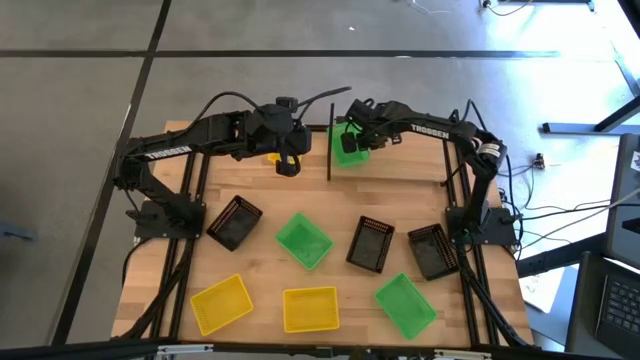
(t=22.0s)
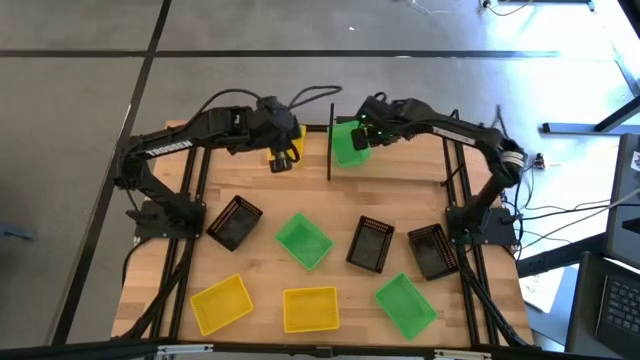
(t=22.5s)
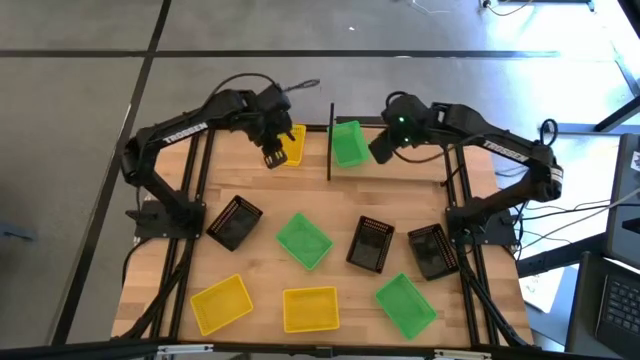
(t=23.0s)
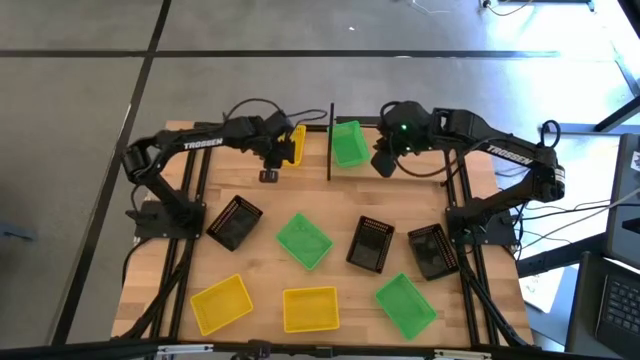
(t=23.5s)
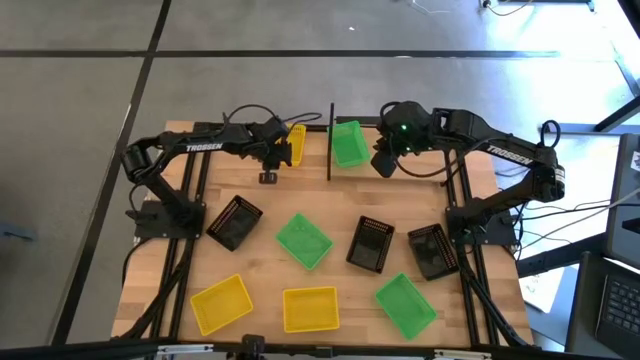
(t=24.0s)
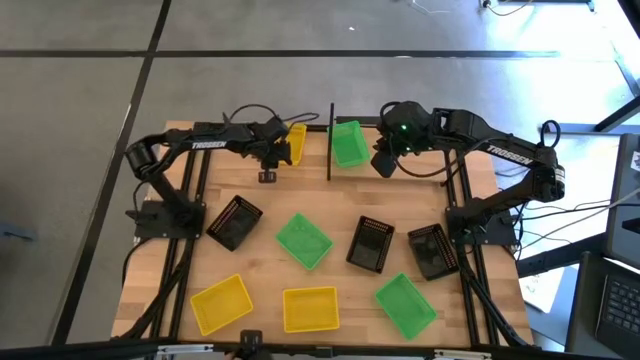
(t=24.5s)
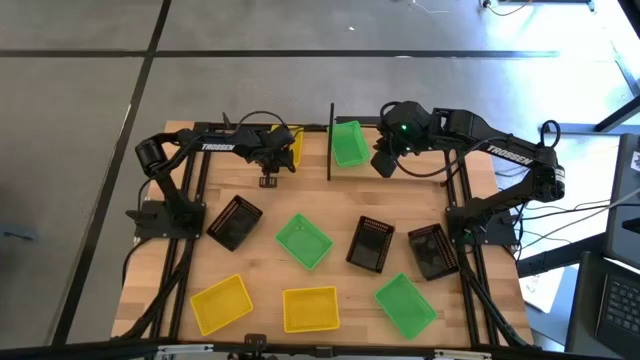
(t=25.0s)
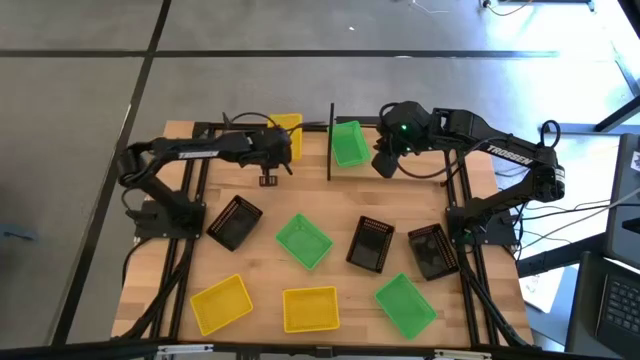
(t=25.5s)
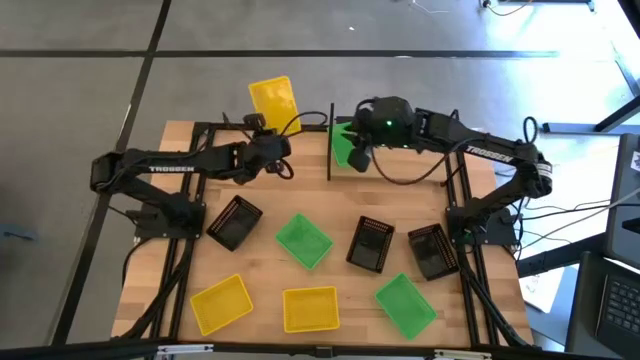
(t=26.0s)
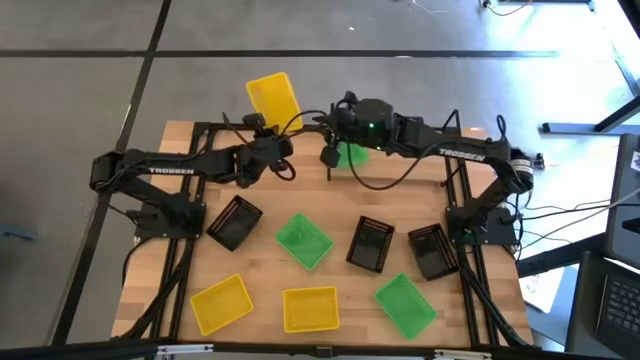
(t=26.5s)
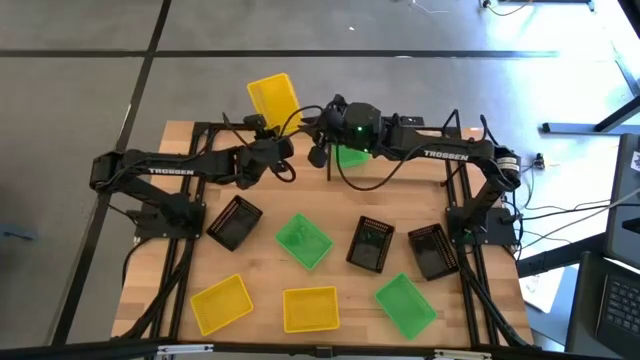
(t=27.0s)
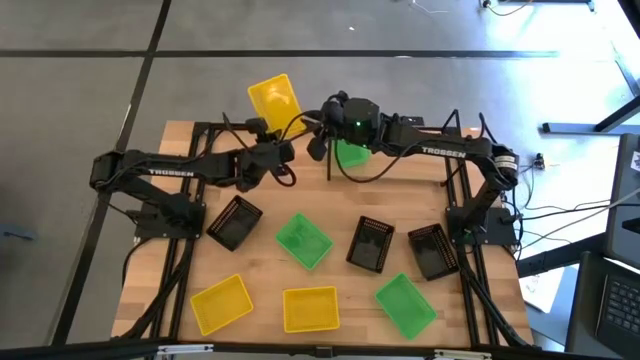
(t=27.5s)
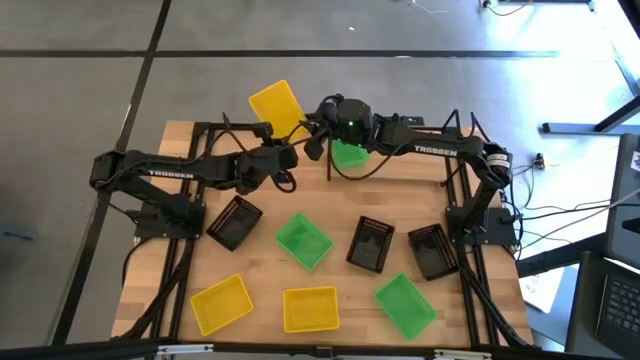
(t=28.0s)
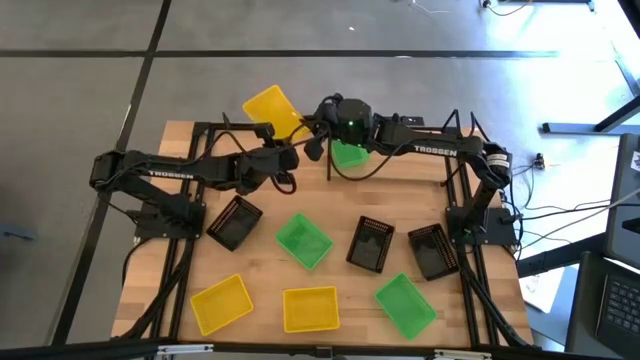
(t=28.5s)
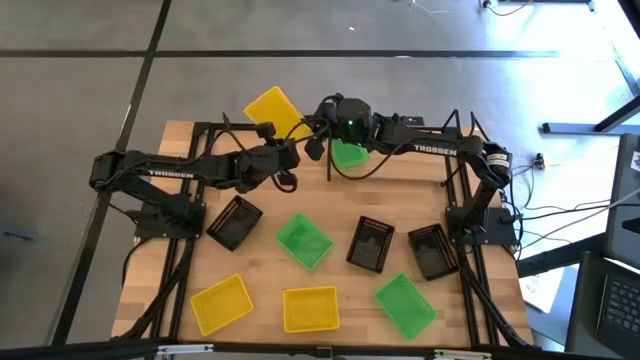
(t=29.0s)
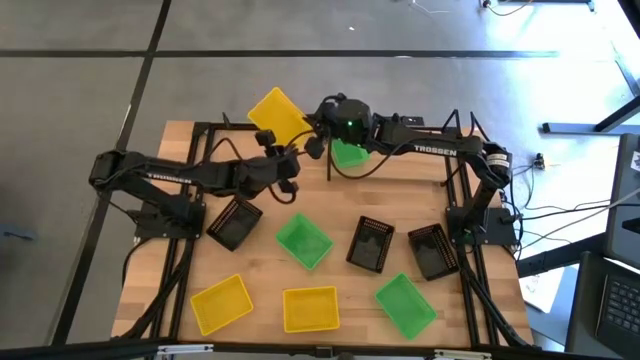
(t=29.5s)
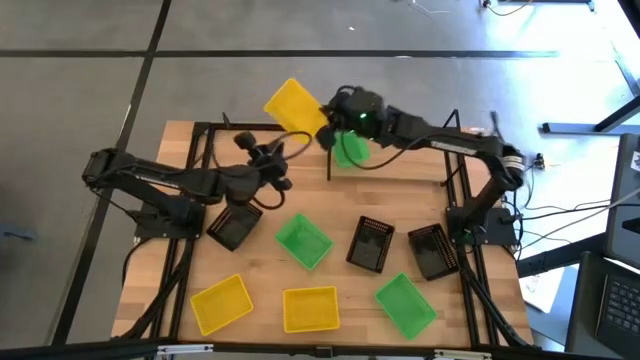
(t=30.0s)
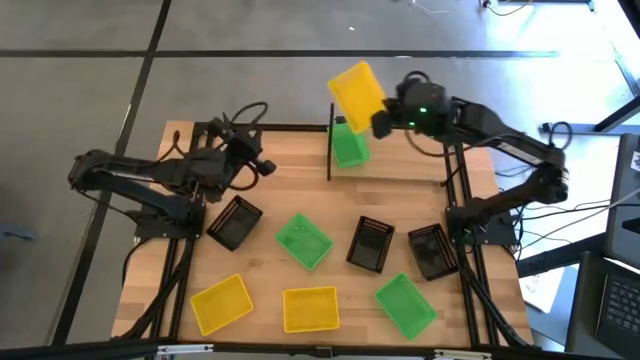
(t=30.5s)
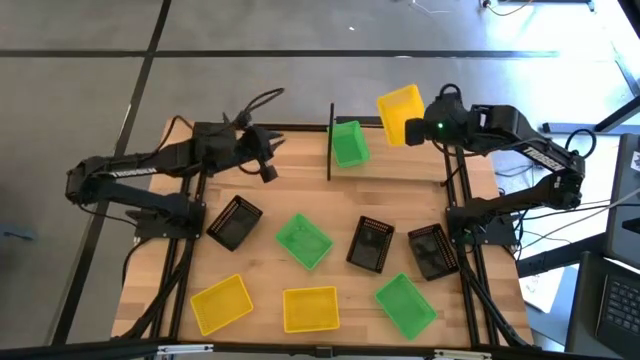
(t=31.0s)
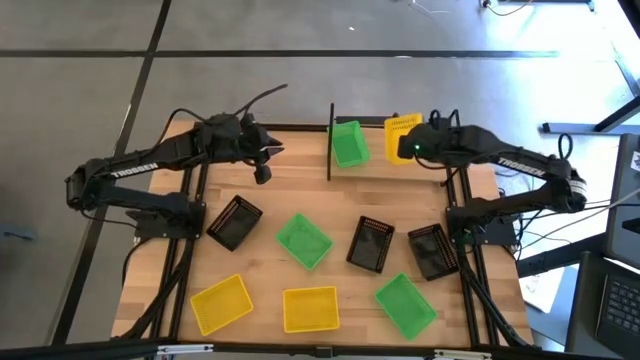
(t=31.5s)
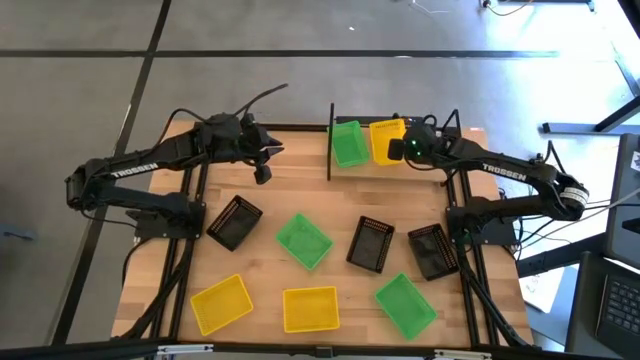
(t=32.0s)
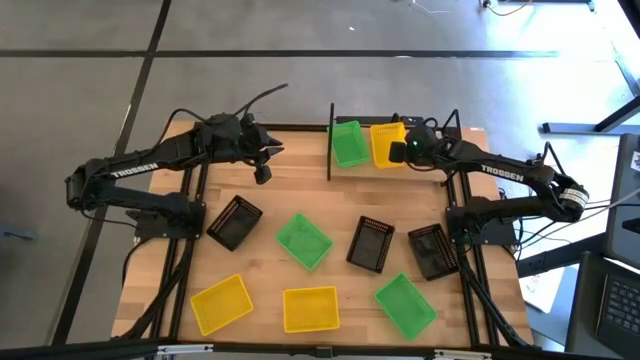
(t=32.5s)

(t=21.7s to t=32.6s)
Task: Stack baskets on shelf by color
Put the top yellow bin onto the shelf

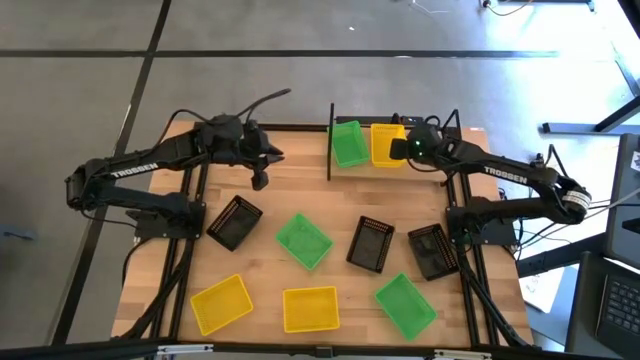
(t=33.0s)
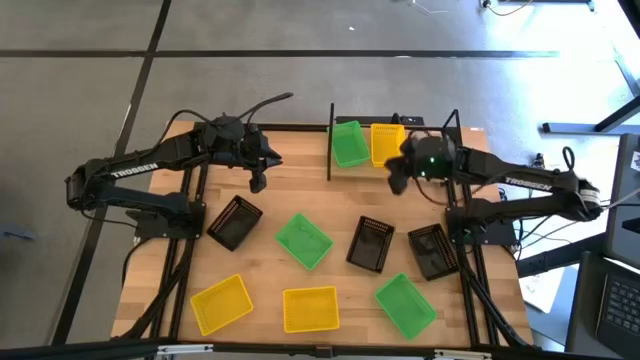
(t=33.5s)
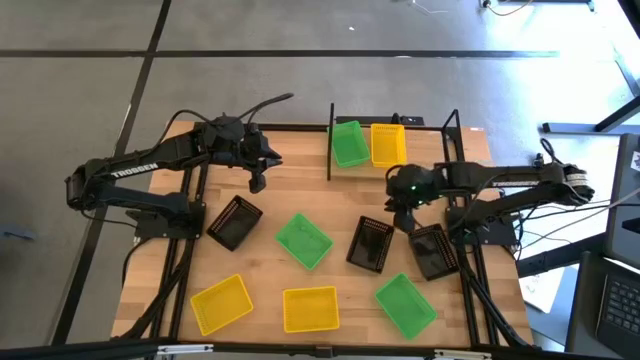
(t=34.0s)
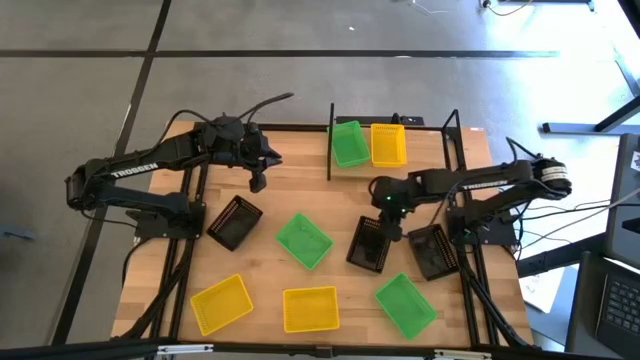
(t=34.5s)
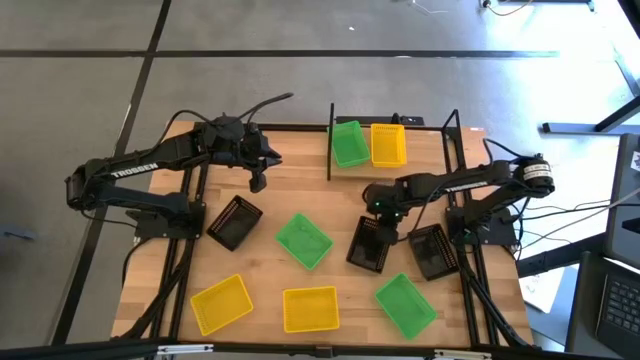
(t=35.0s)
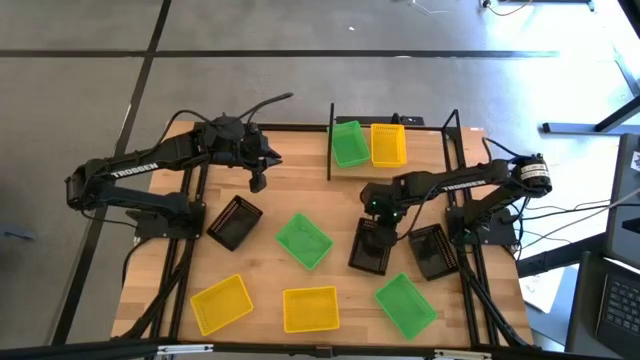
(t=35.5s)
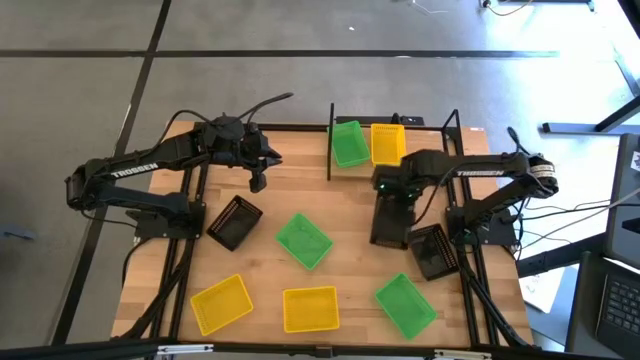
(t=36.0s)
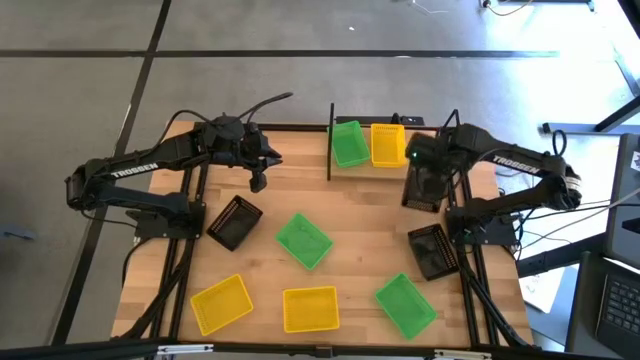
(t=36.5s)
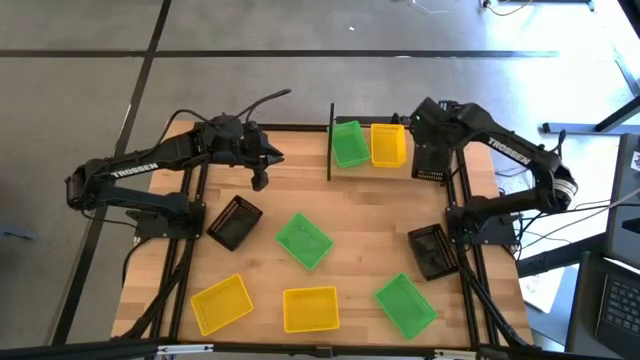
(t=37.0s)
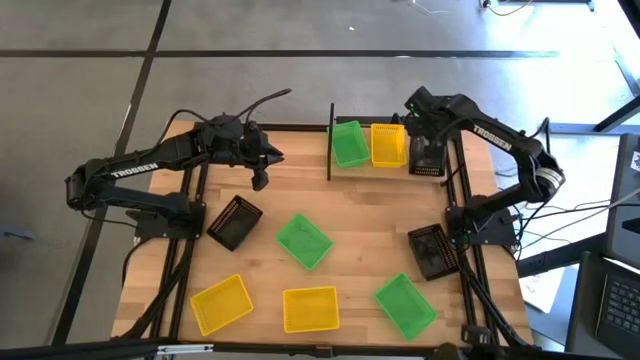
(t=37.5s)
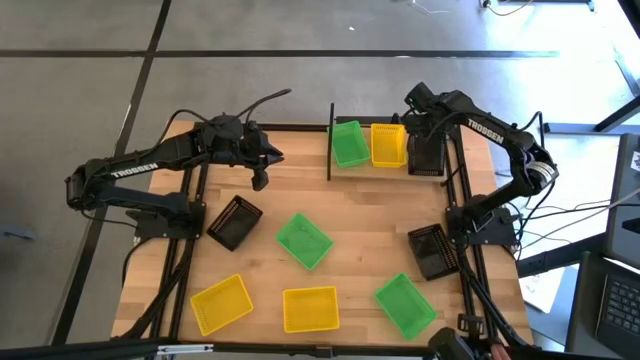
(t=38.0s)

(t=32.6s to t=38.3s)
Put the center black bin onto the shelf

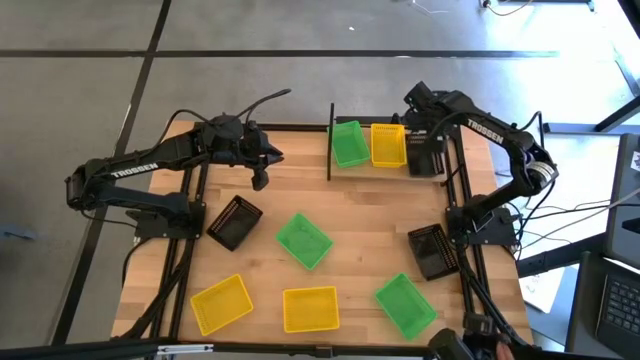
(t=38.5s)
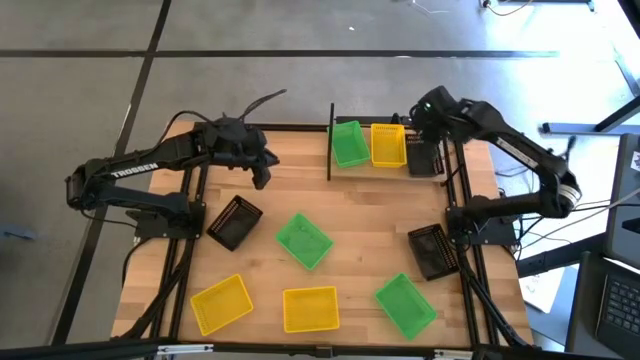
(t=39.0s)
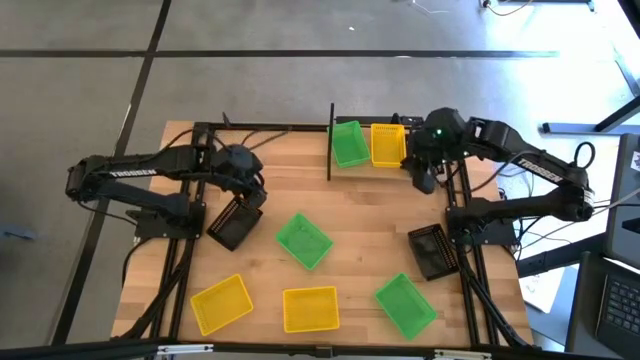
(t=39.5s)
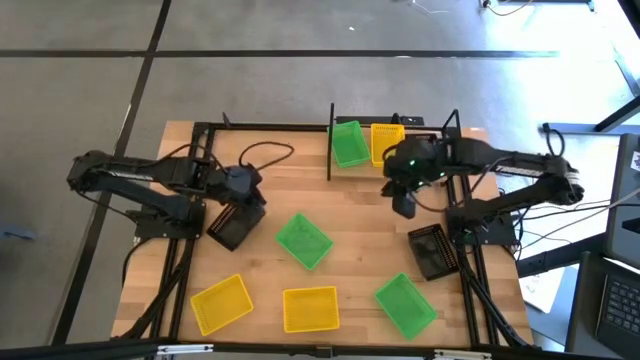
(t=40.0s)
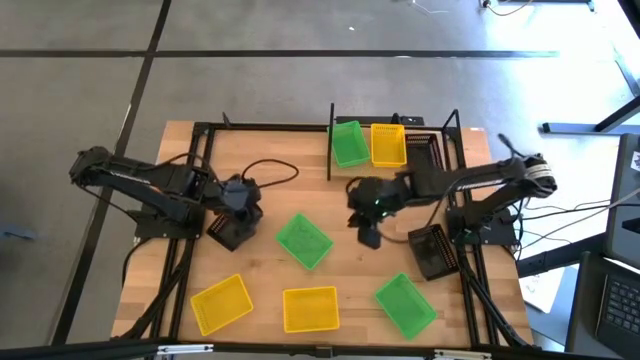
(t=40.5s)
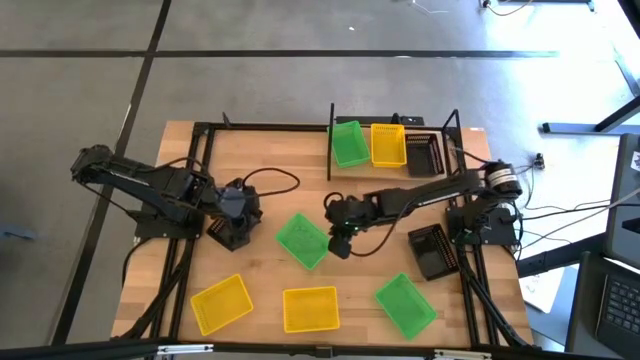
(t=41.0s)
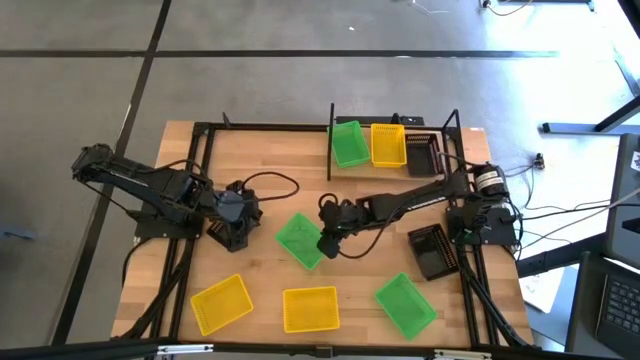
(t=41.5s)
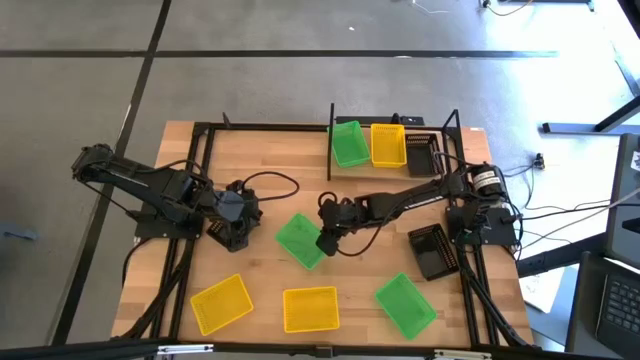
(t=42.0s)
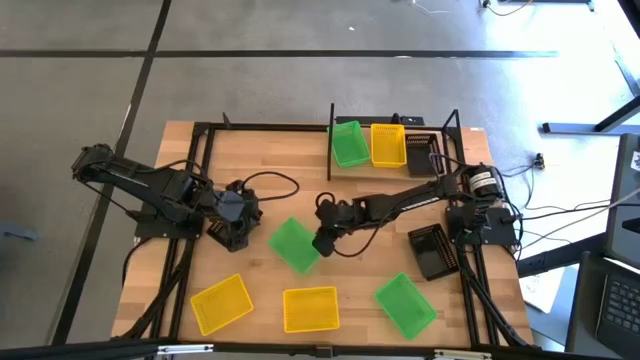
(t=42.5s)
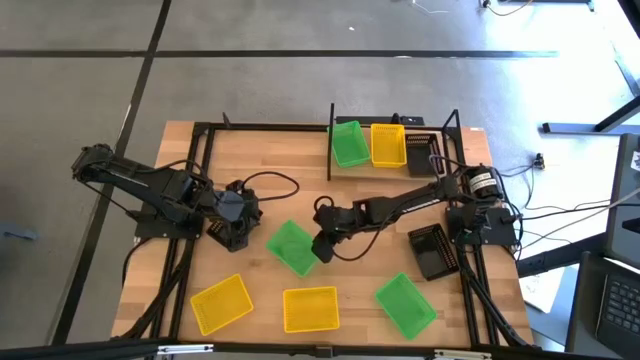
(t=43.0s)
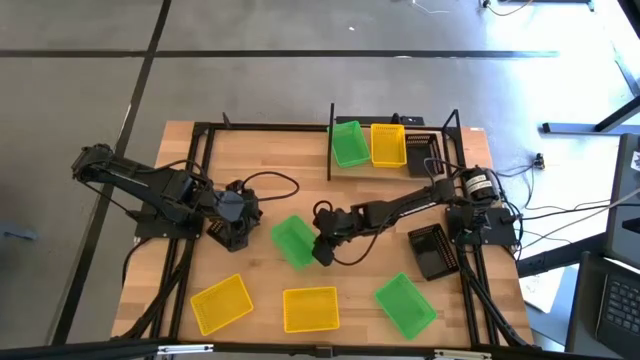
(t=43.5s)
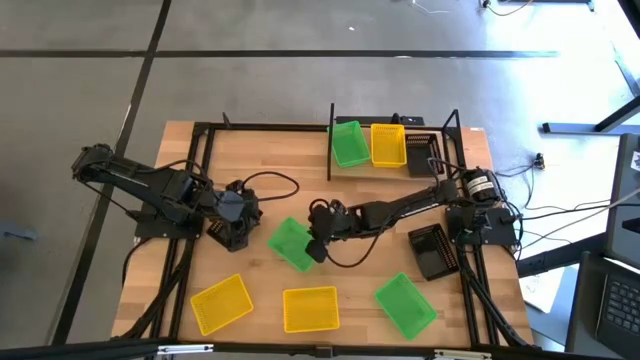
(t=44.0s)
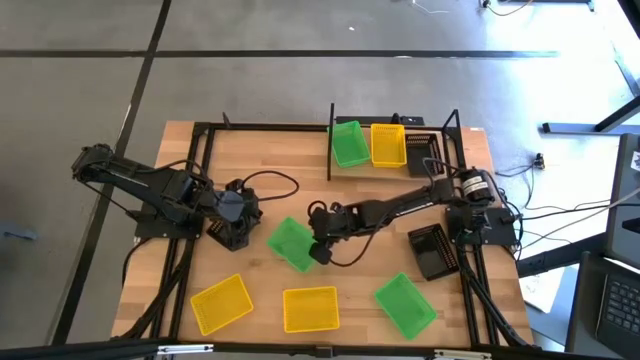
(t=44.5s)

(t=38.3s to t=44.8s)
Stack the top green bin on the green bin on the shelf
